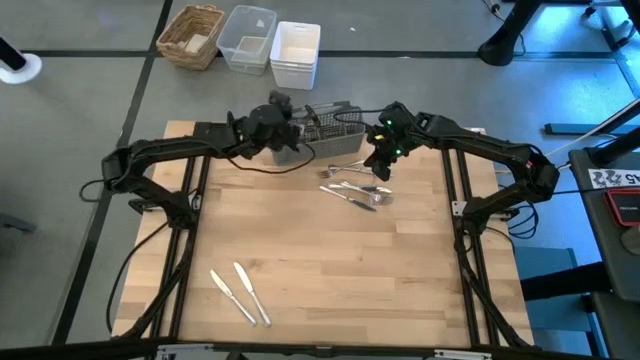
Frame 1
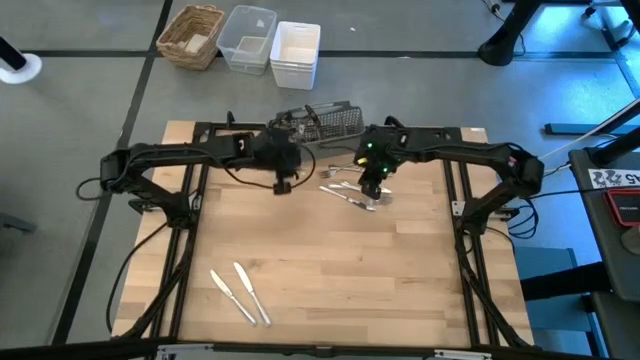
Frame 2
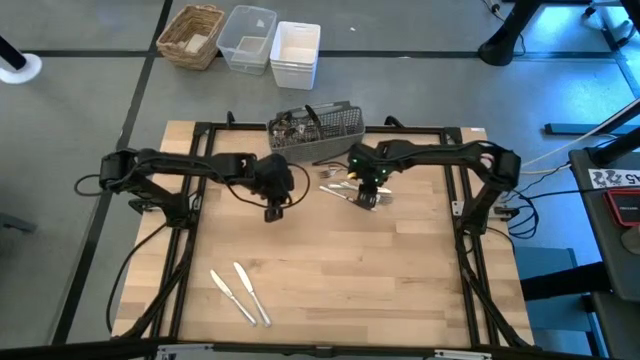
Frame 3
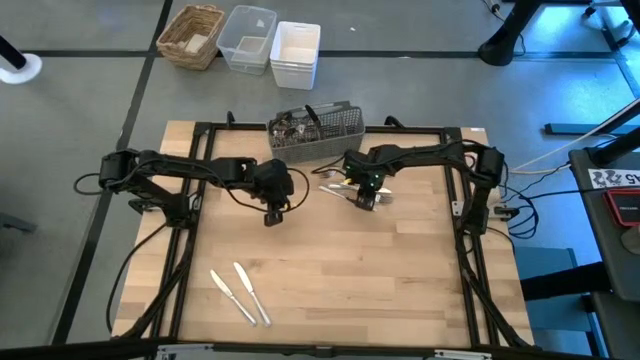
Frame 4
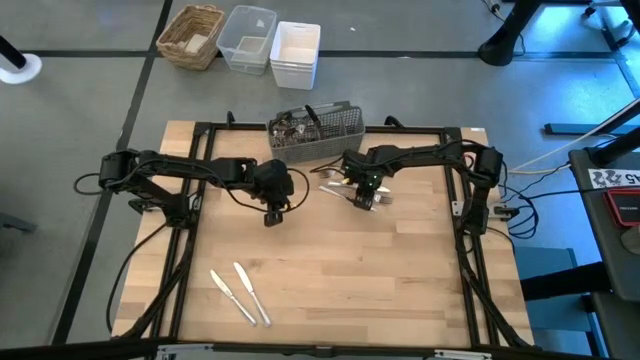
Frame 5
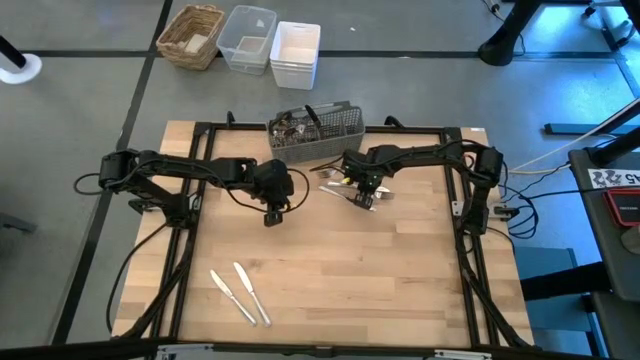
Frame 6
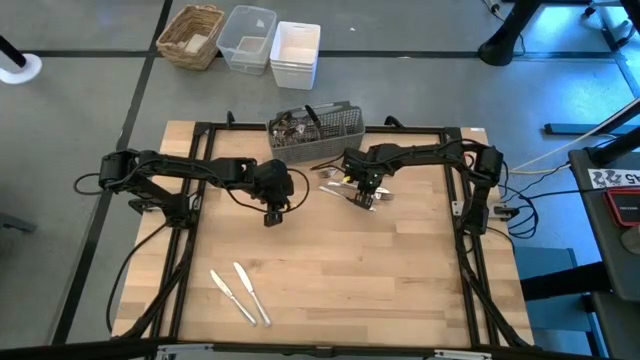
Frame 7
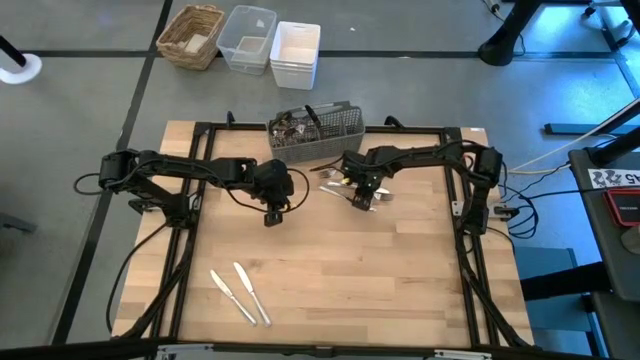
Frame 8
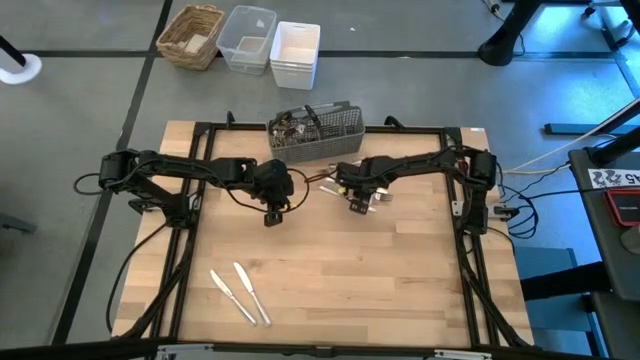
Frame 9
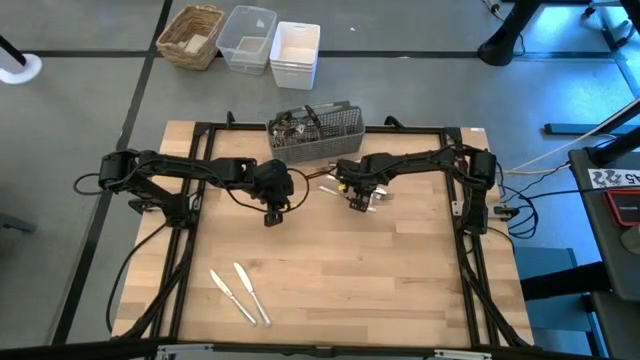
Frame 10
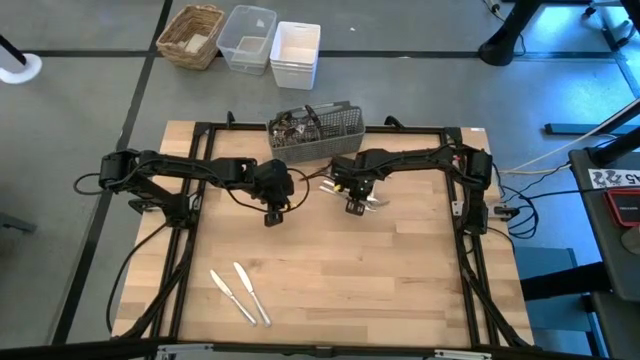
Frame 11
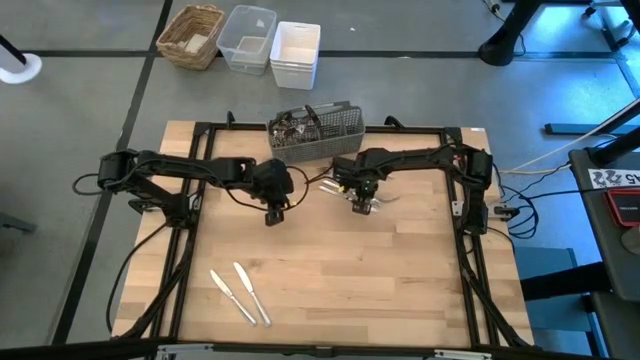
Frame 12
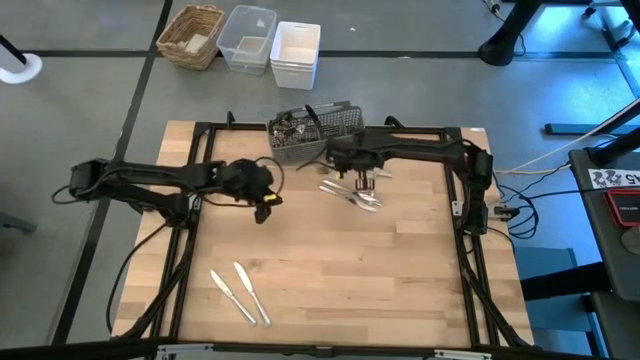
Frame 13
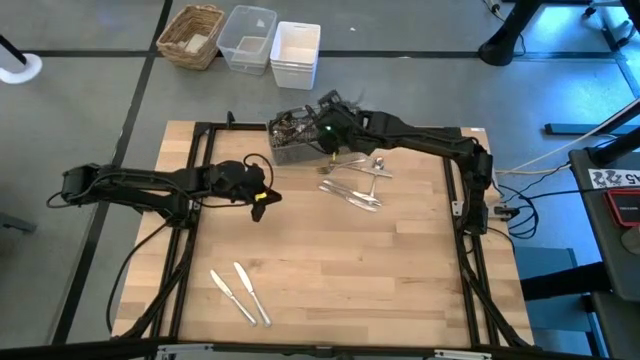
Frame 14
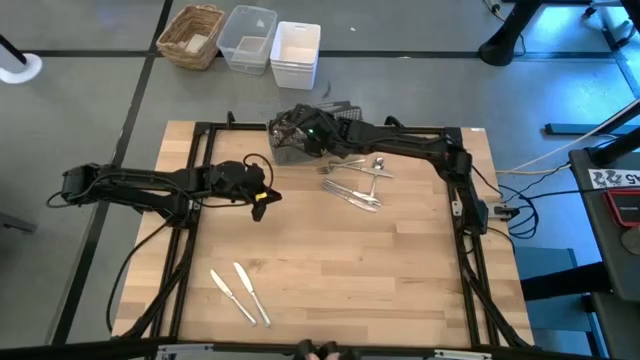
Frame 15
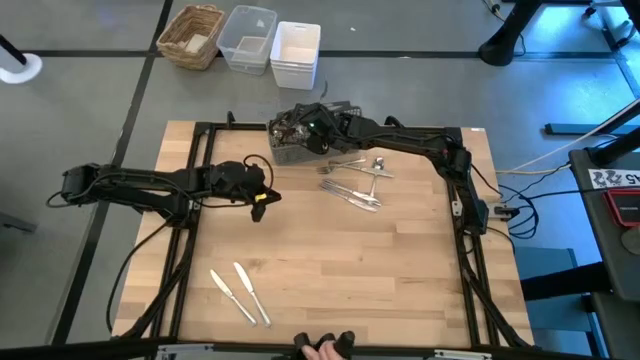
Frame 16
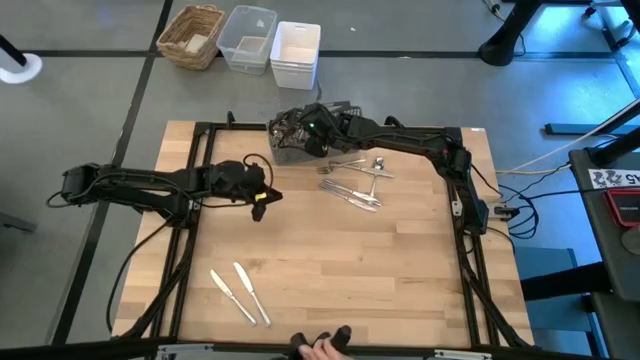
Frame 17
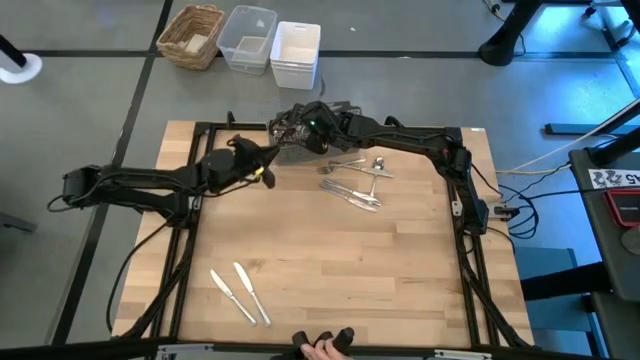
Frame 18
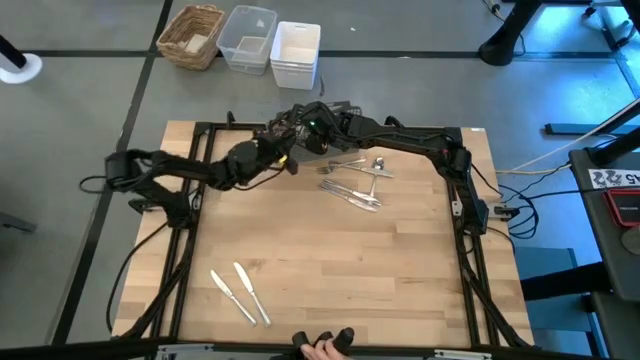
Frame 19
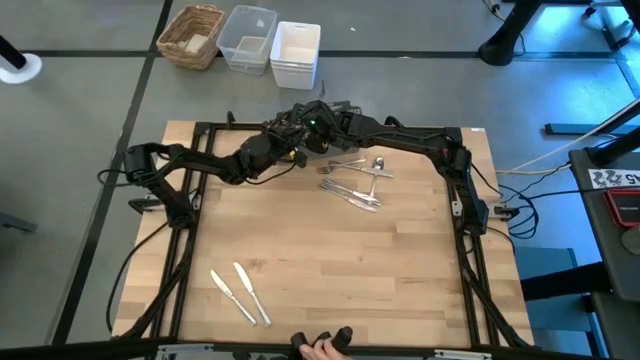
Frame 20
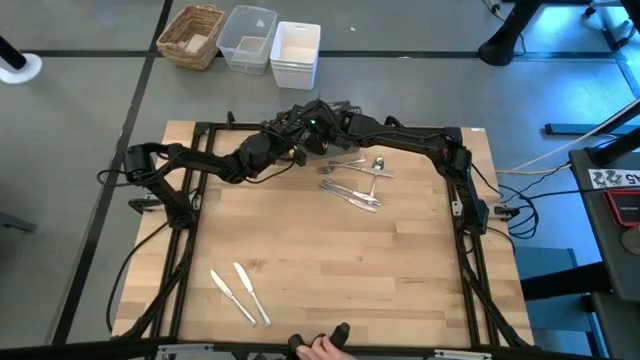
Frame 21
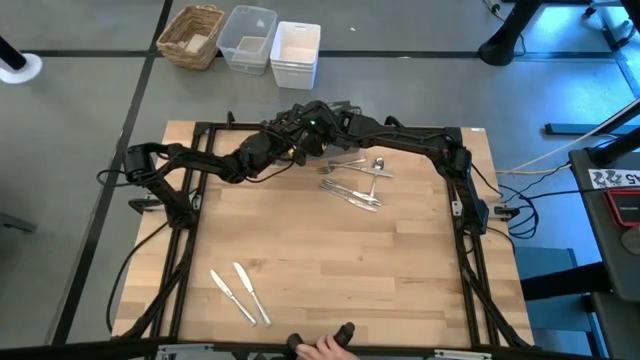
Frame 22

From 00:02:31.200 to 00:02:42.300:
Task: Sort silverware
Put the silver fork into the silverware rack

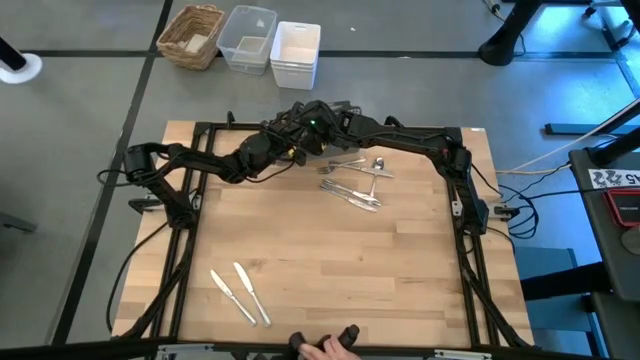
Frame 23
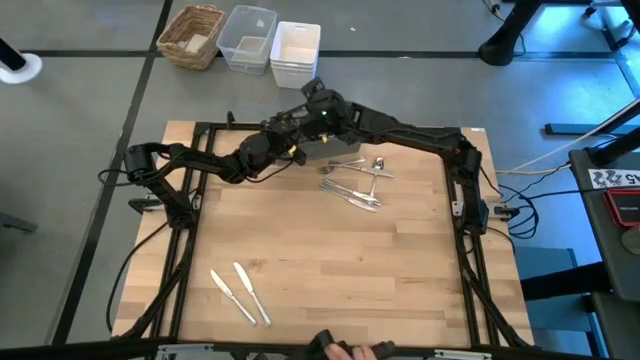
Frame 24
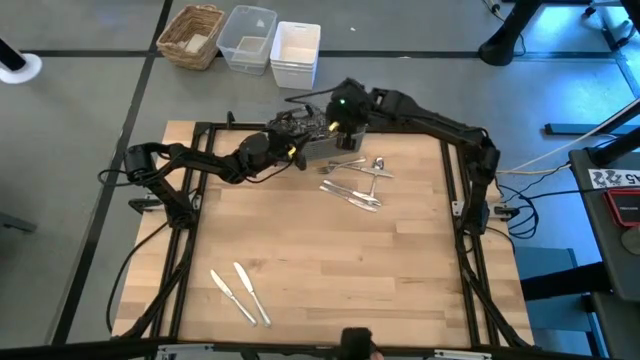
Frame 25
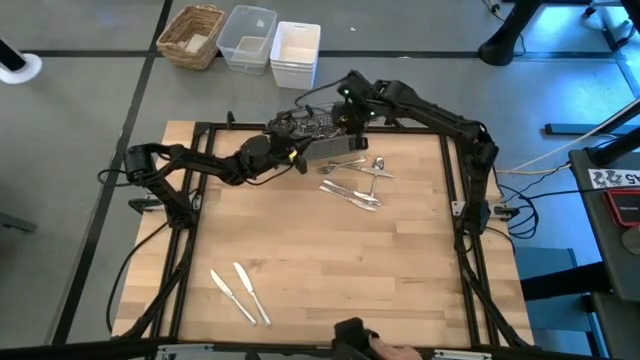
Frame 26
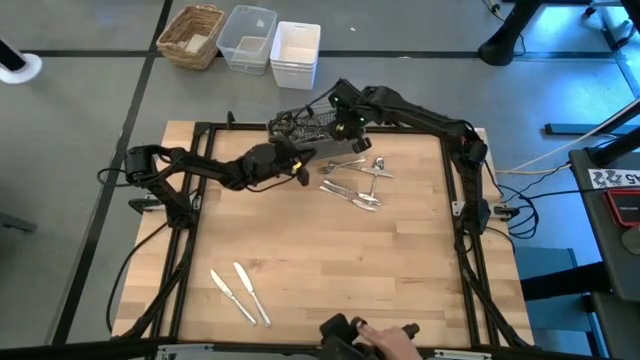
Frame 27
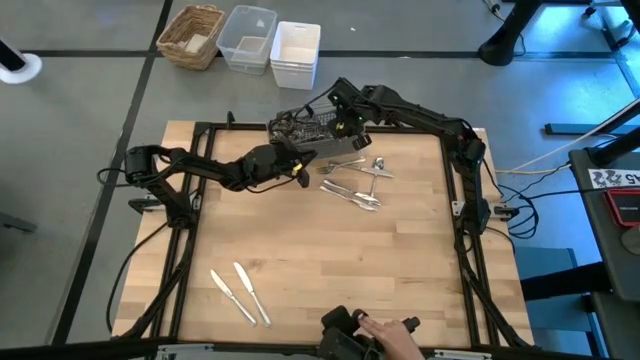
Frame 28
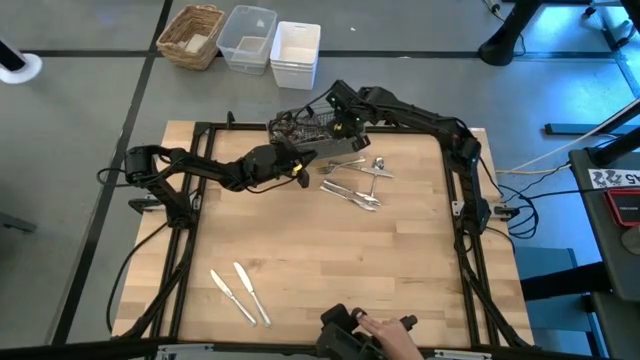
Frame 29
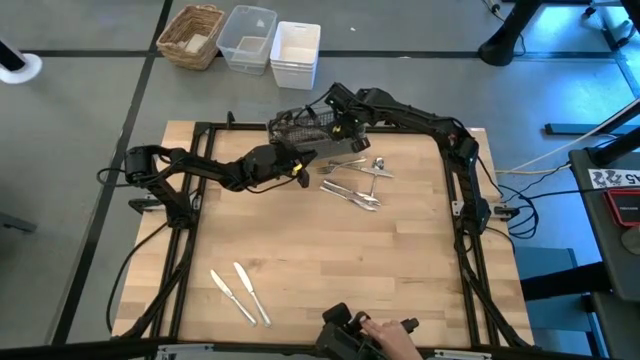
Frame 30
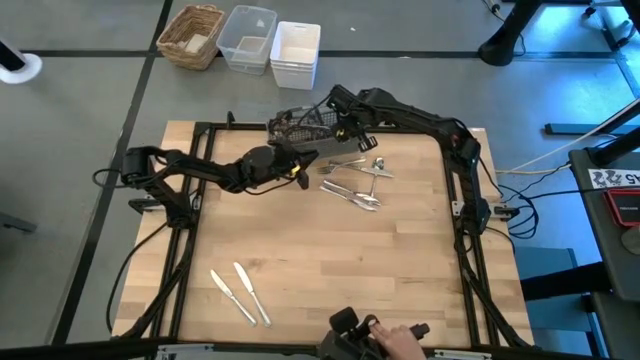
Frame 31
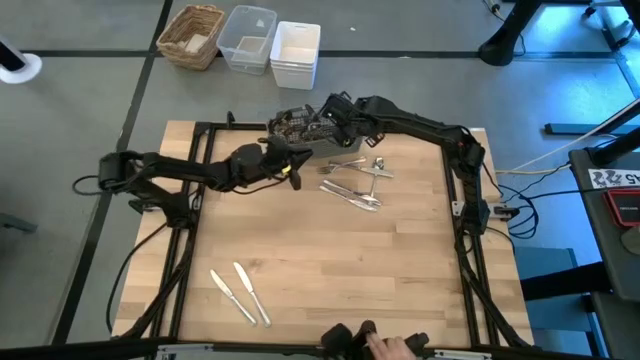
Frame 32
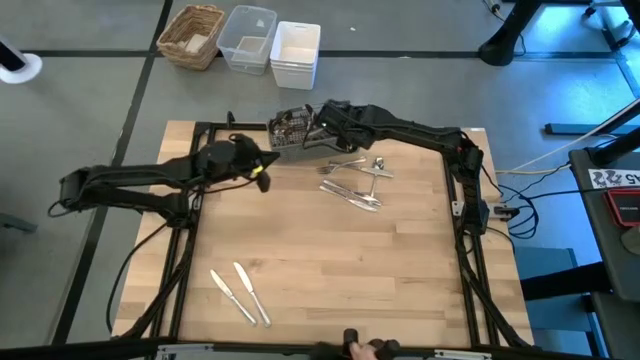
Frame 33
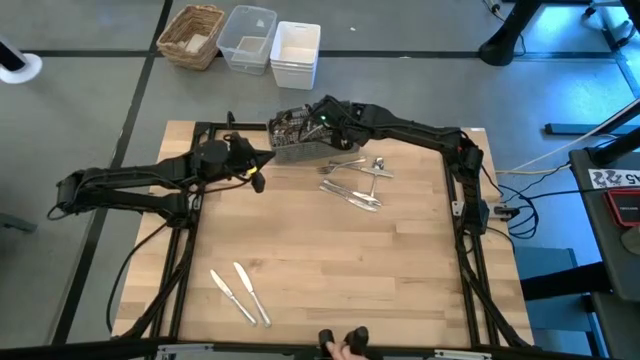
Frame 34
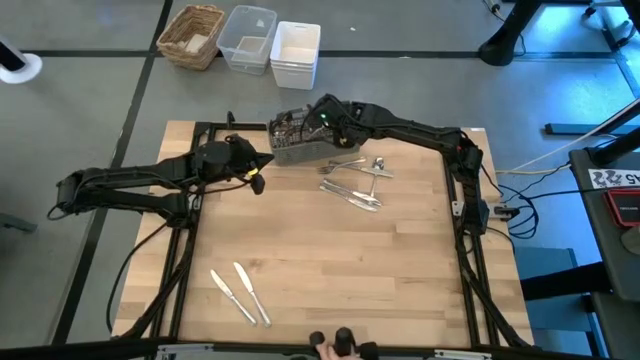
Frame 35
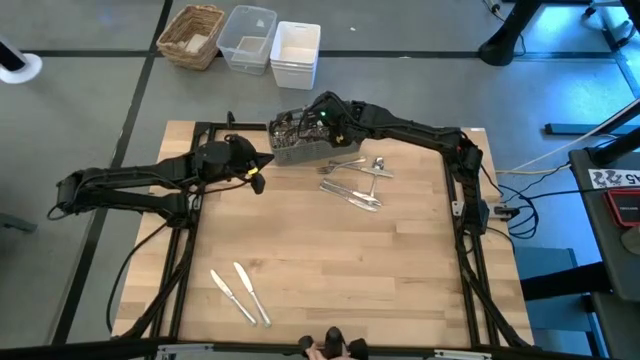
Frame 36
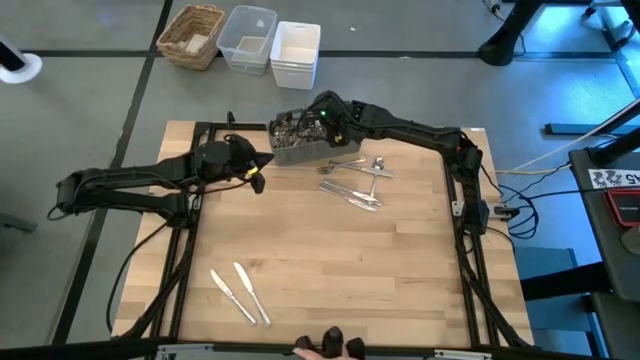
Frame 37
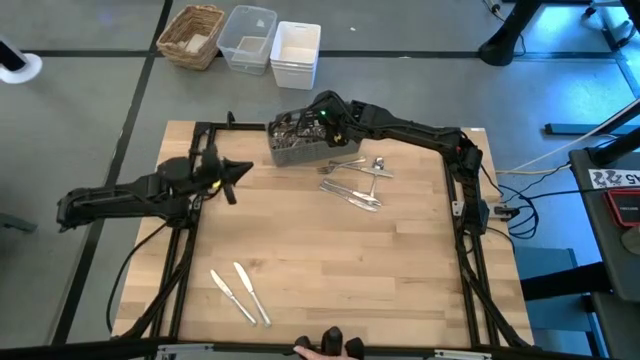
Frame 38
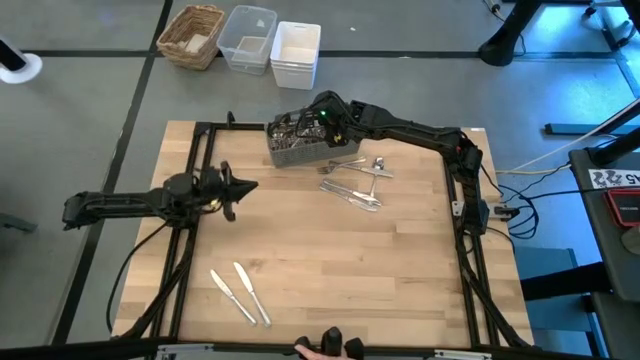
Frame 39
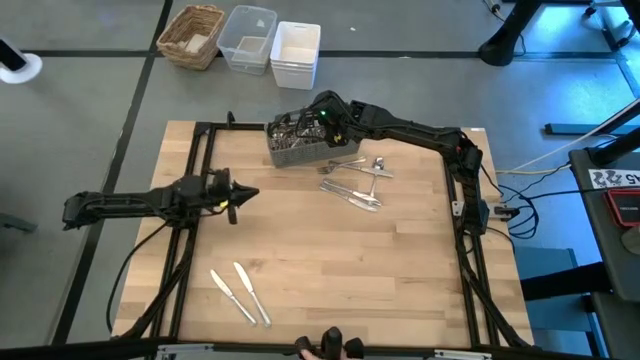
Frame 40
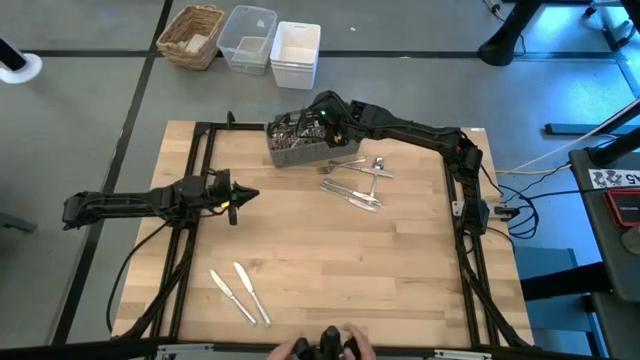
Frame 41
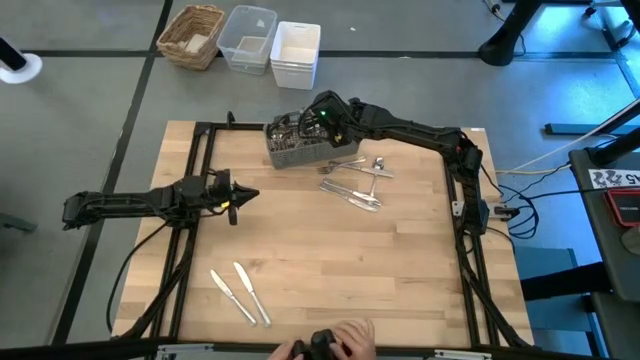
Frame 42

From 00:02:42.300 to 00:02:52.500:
Put the silver fork into the silverware rack

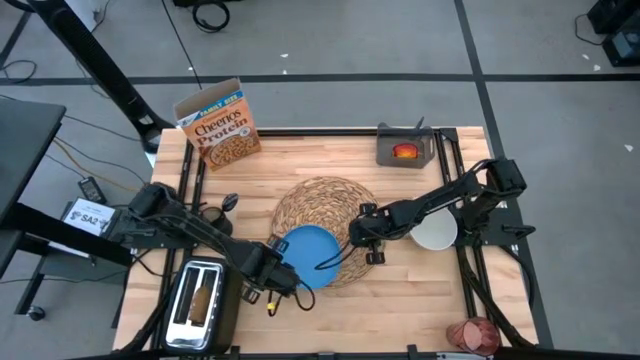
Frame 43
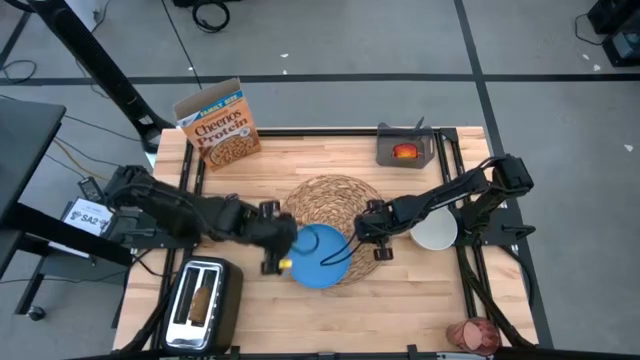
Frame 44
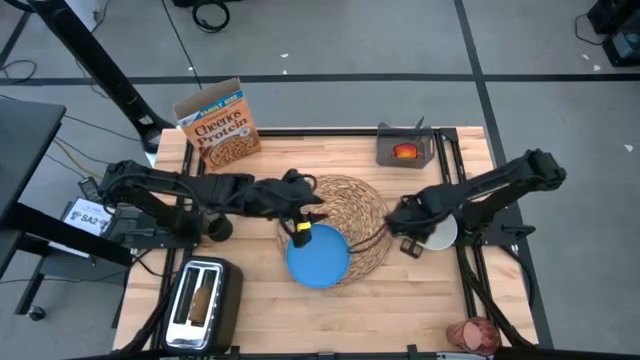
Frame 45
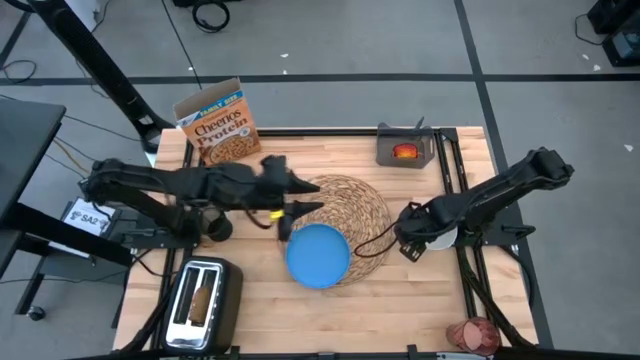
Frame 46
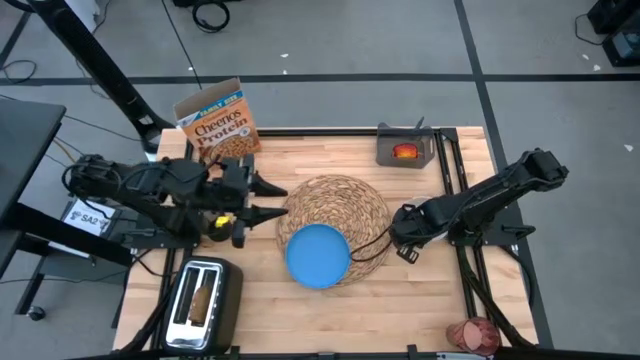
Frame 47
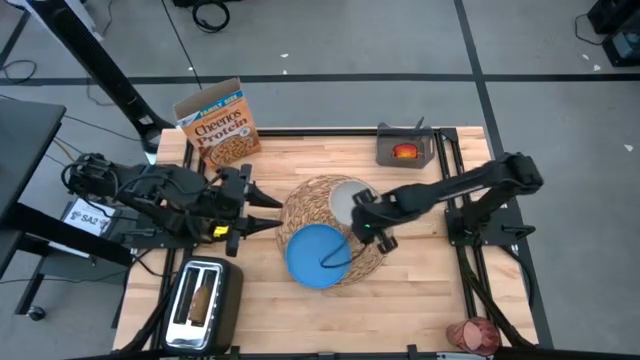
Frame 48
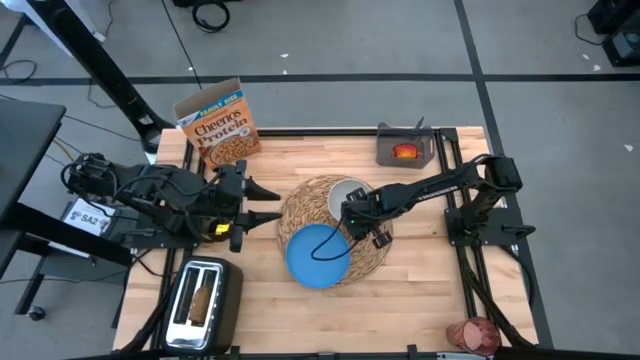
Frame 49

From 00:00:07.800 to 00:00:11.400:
Task: Arrange a breakfast setting
Put the white bowl on the brown placemat
